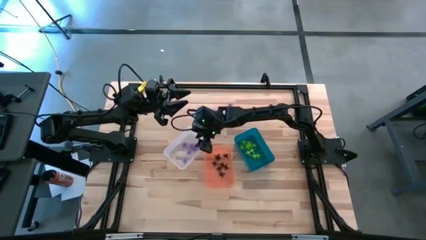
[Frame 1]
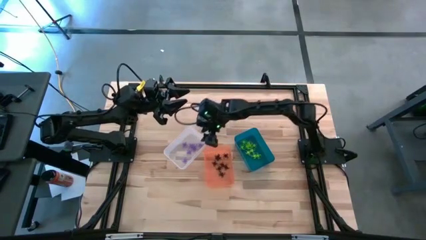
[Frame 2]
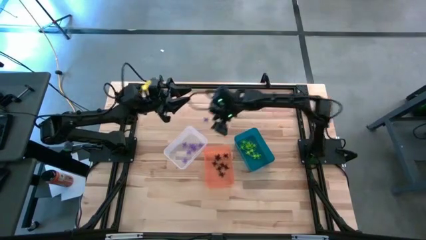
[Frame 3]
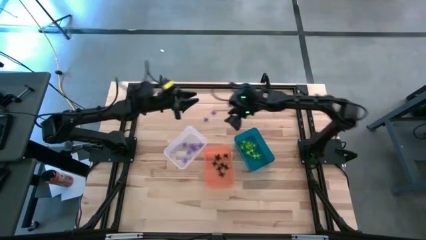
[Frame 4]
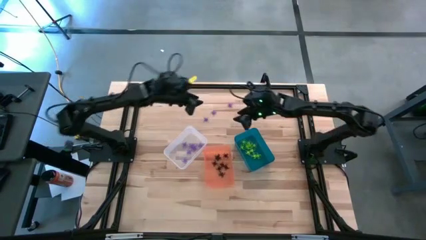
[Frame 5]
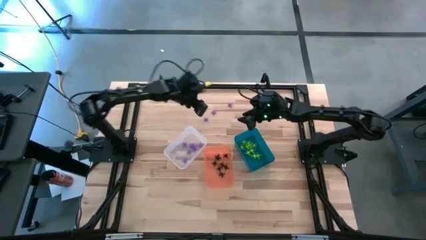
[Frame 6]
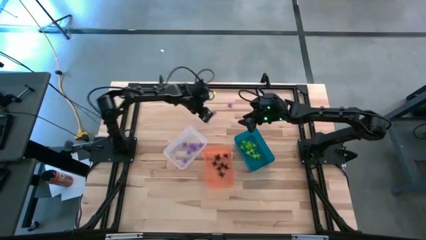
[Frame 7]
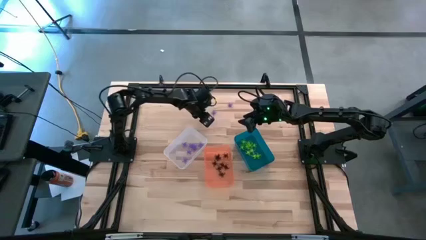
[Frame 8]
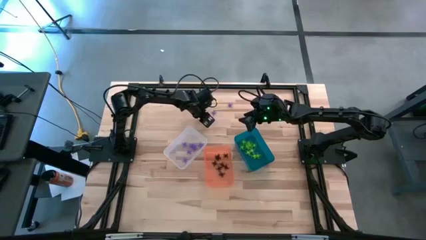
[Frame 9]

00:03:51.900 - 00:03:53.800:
Task: Sort Halloween decoration
Put the purple spider toy into the transparent bin

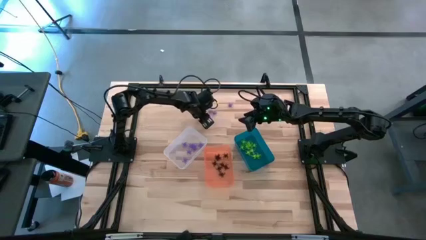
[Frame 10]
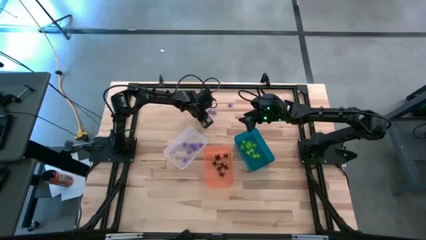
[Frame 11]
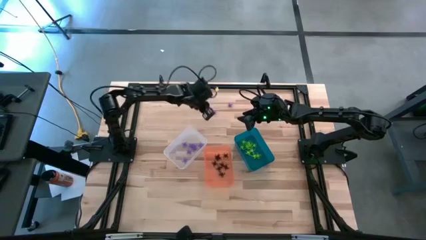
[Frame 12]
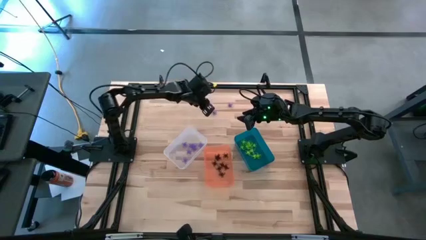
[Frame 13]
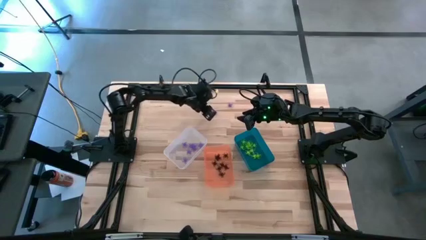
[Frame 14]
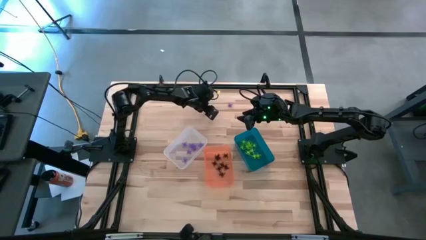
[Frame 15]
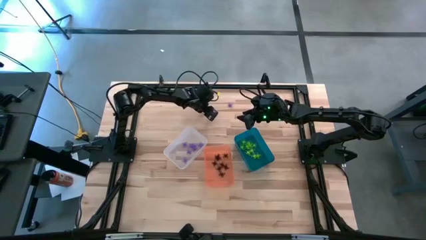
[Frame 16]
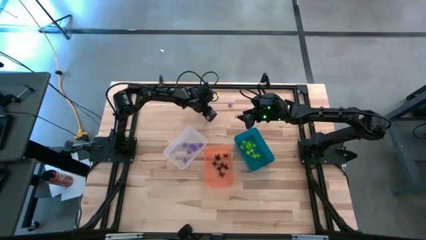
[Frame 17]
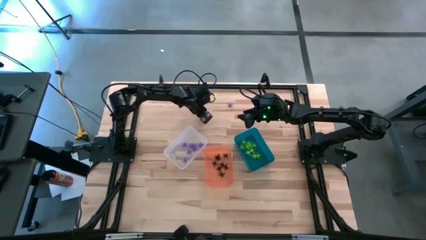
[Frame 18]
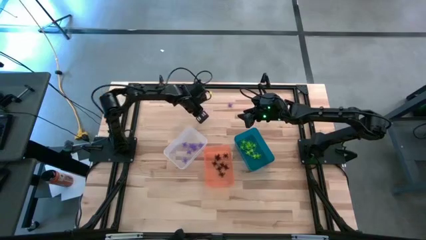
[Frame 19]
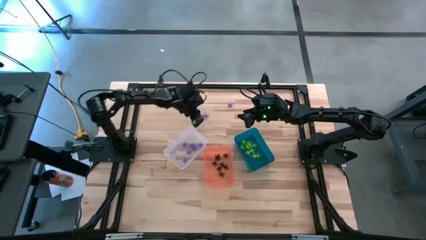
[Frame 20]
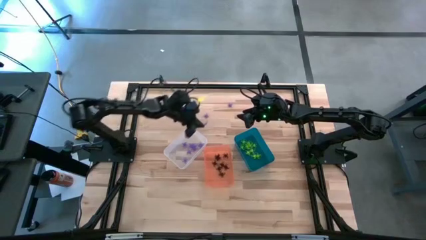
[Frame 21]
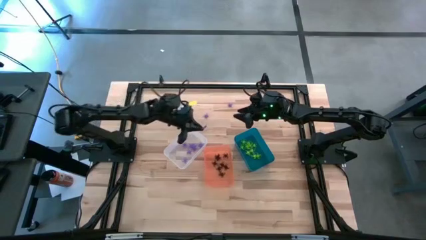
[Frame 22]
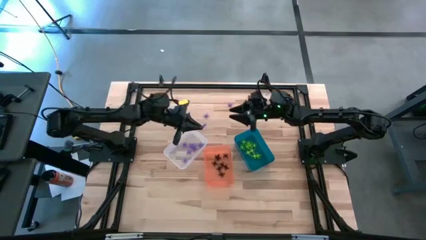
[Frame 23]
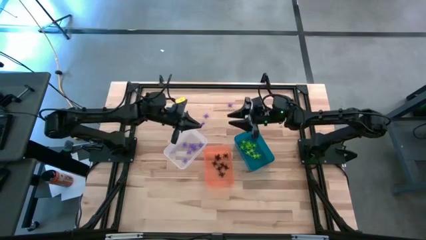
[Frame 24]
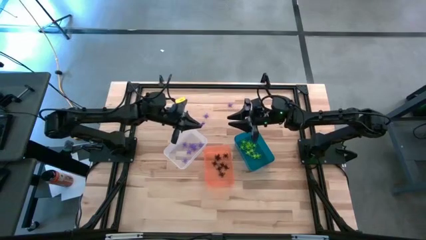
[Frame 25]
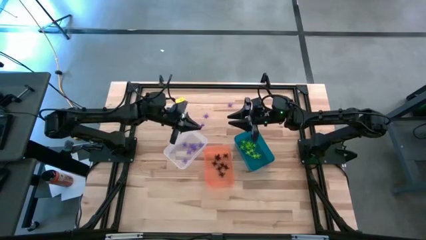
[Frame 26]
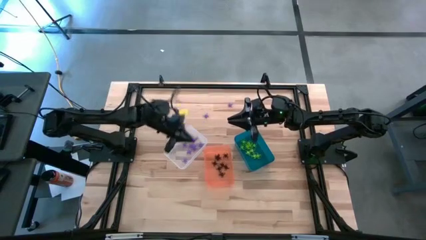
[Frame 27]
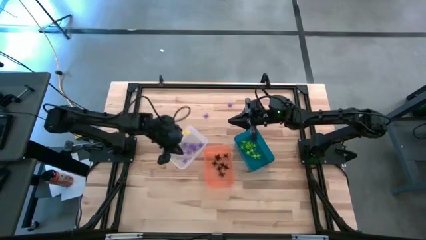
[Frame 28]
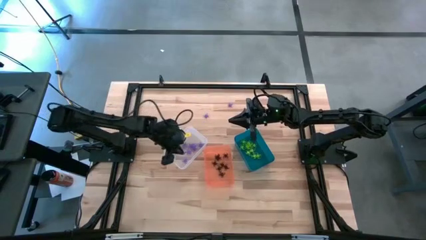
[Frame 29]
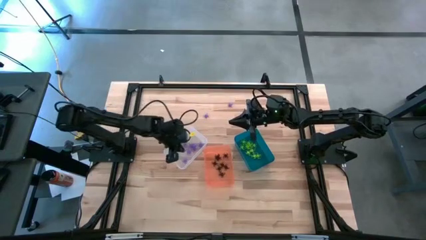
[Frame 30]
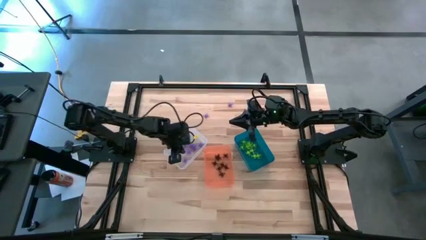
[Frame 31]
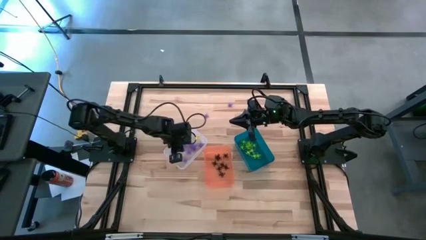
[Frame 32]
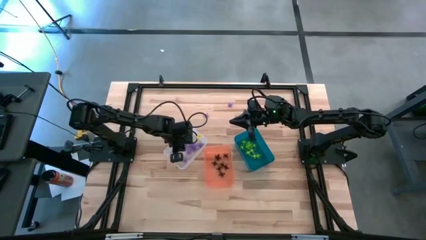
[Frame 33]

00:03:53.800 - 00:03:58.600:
Put the purple spider toy into the transparent bin

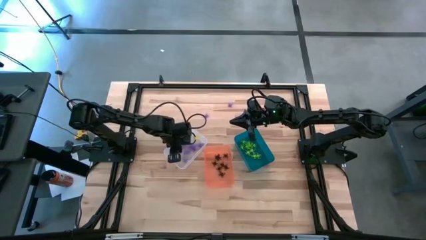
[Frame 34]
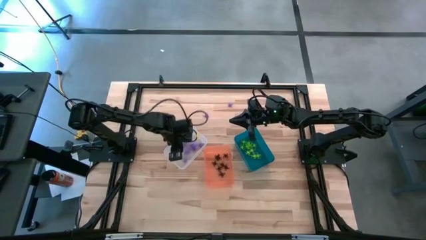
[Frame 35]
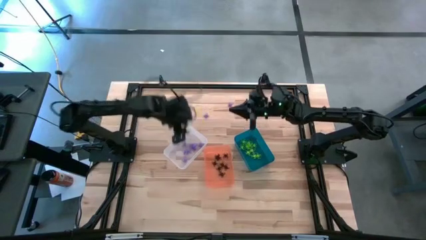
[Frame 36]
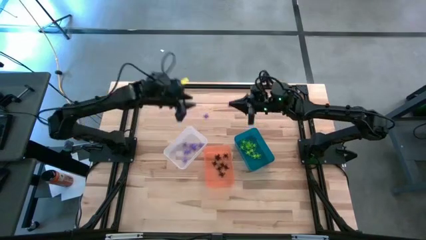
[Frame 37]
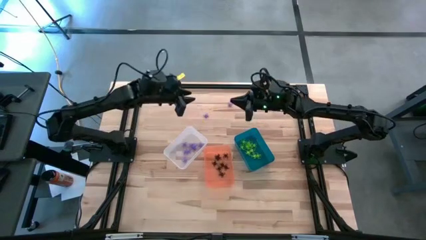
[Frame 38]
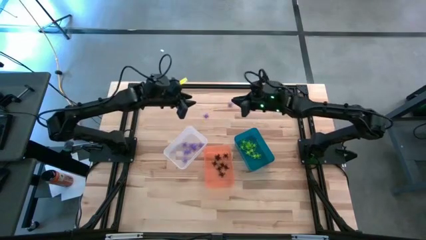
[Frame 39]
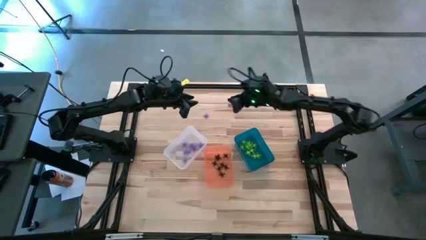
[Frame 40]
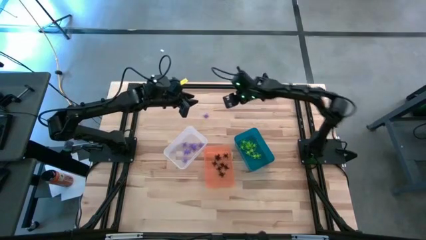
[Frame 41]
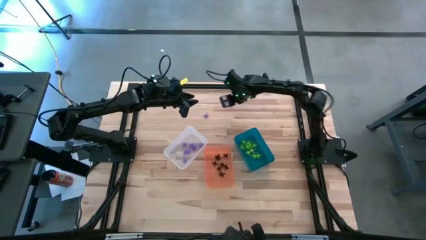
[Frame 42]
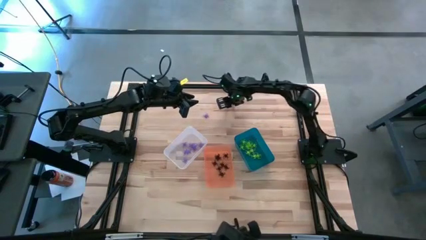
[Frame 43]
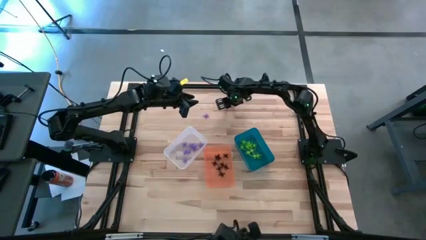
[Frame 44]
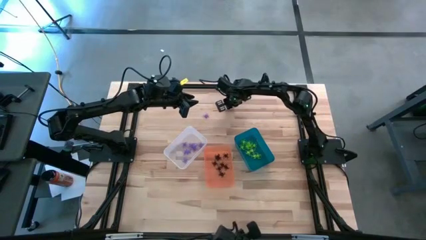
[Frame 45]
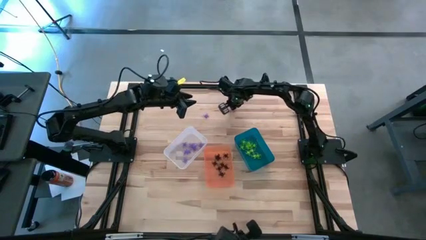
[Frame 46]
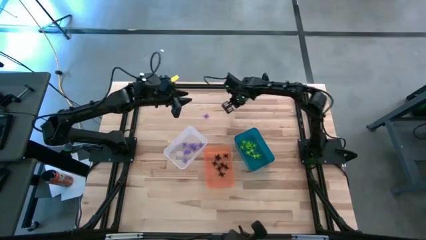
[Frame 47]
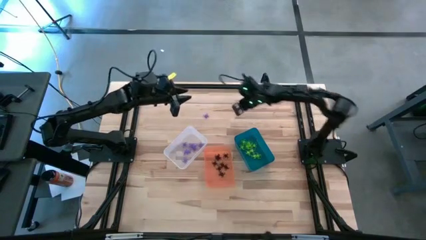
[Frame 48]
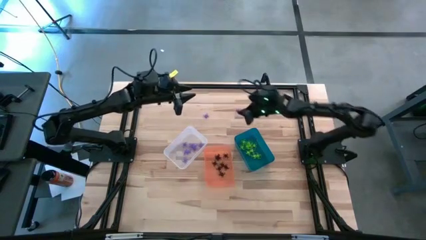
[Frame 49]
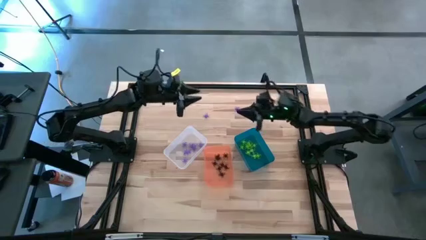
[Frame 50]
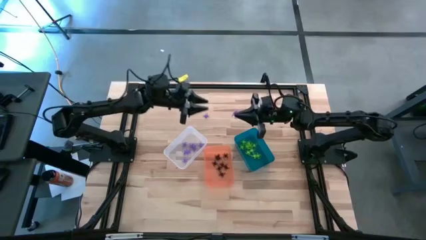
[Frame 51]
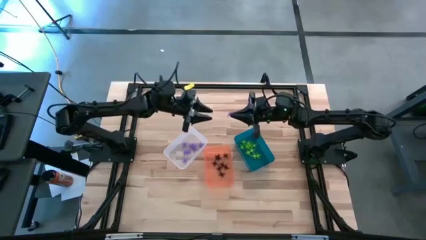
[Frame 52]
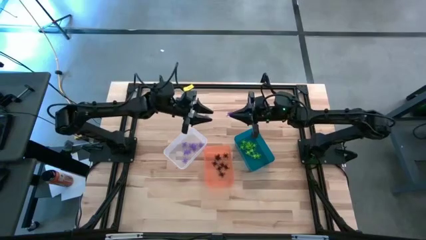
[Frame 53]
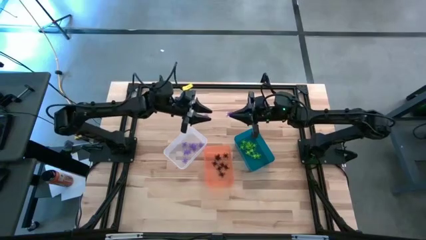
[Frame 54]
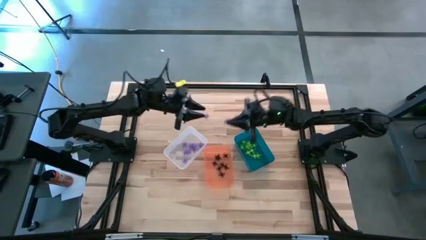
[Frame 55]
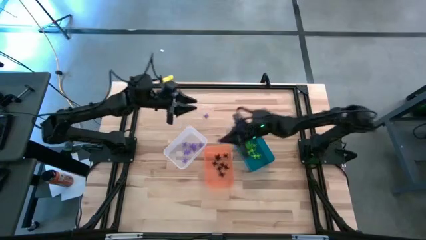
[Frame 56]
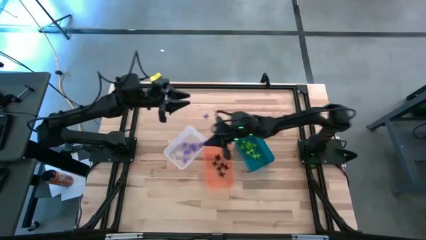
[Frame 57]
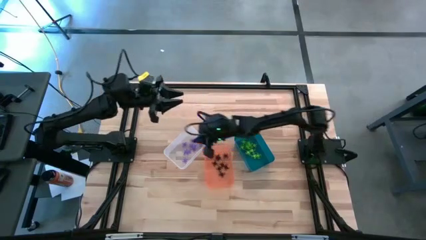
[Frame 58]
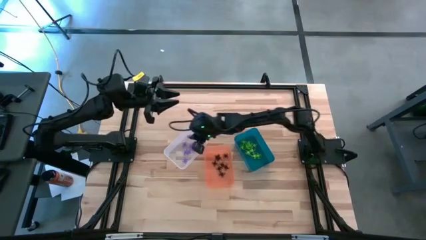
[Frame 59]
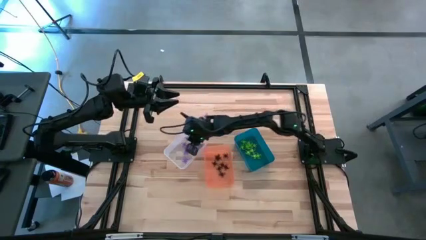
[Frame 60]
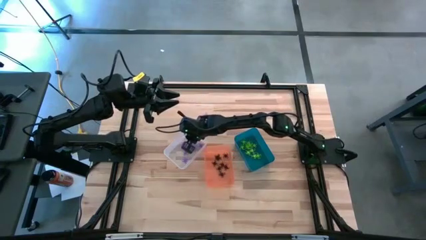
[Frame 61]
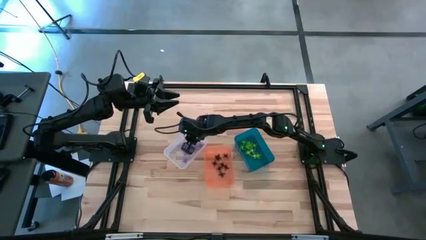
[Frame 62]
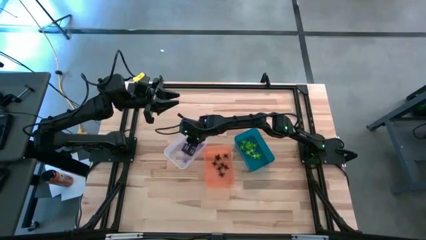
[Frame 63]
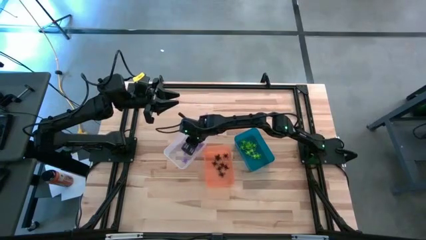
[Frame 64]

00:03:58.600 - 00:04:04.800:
Put the purple spider toy into the transparent bin

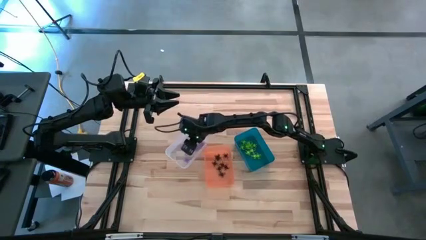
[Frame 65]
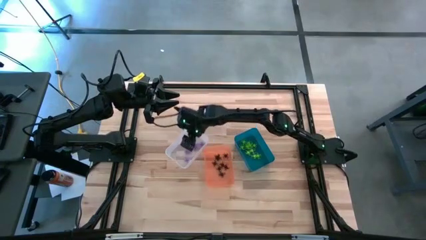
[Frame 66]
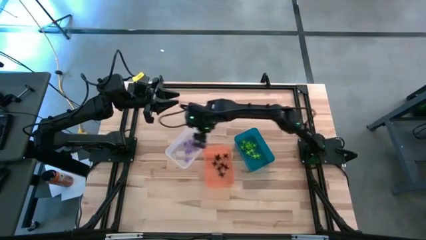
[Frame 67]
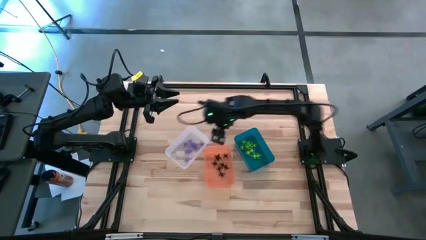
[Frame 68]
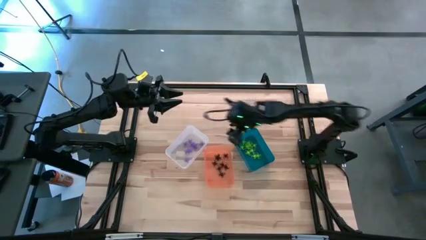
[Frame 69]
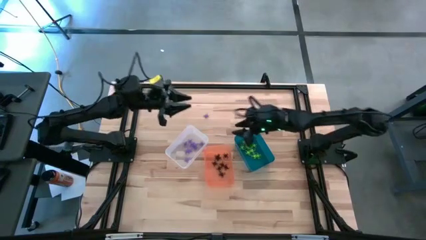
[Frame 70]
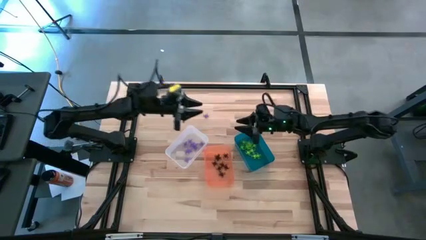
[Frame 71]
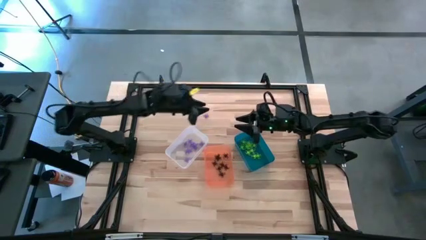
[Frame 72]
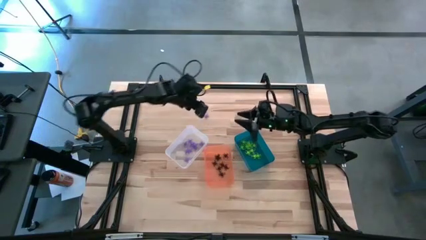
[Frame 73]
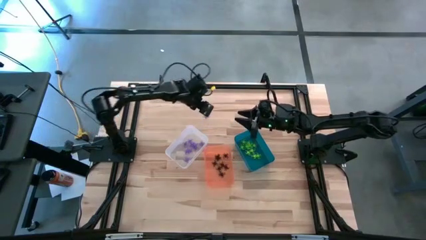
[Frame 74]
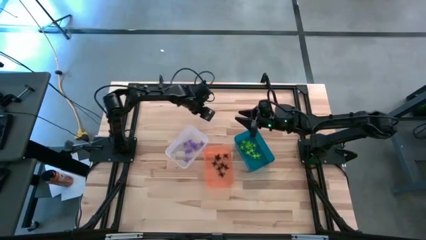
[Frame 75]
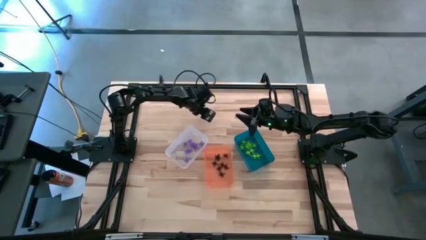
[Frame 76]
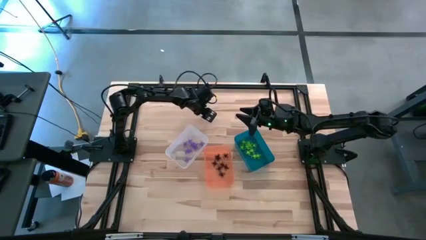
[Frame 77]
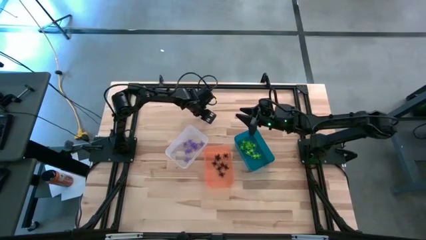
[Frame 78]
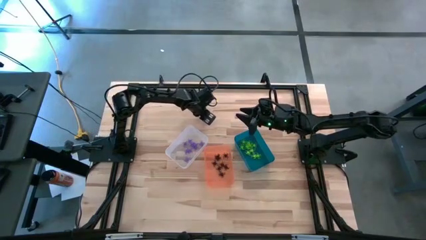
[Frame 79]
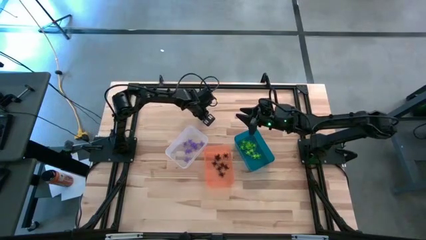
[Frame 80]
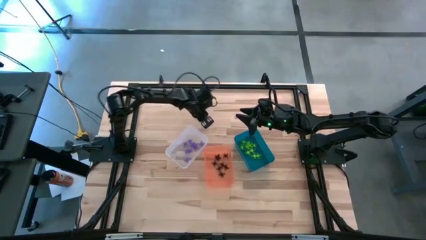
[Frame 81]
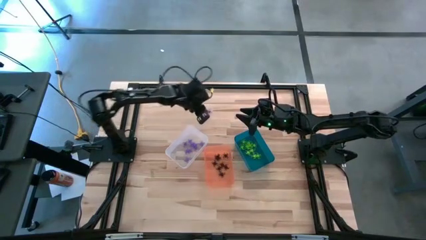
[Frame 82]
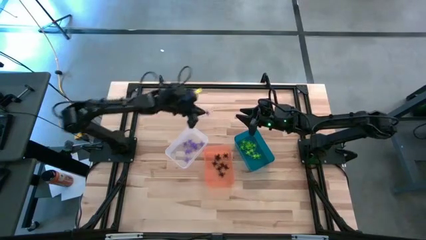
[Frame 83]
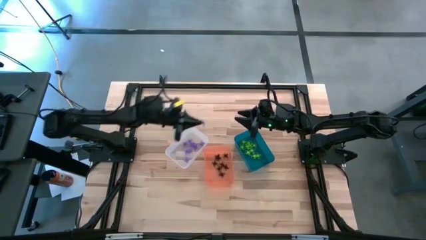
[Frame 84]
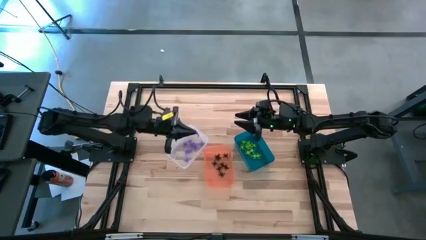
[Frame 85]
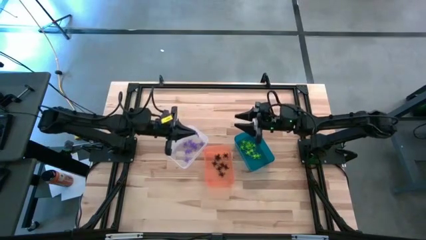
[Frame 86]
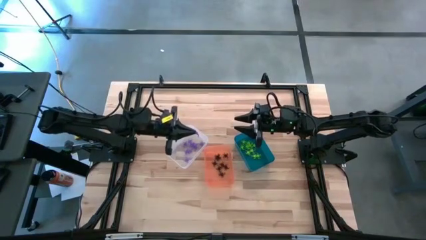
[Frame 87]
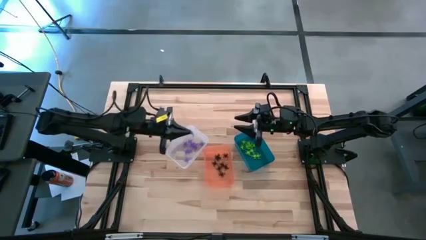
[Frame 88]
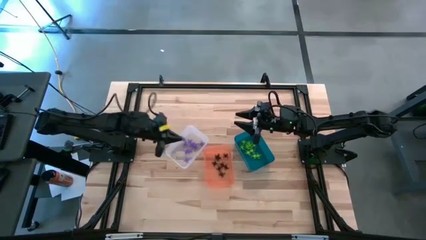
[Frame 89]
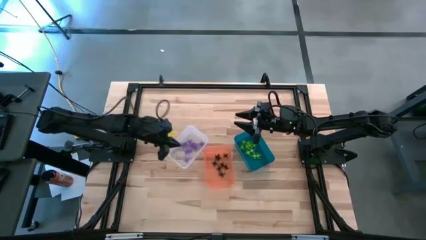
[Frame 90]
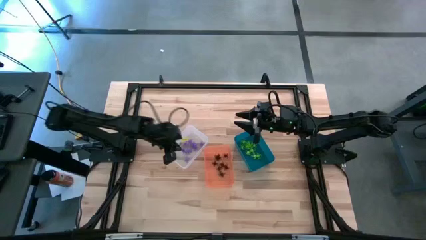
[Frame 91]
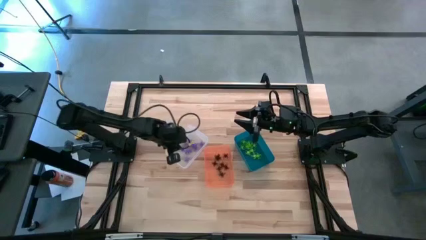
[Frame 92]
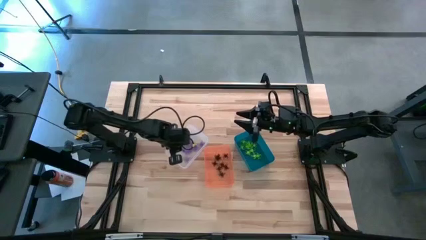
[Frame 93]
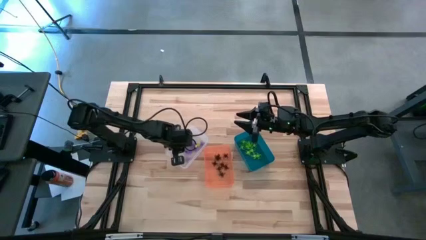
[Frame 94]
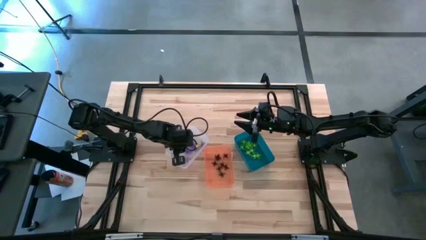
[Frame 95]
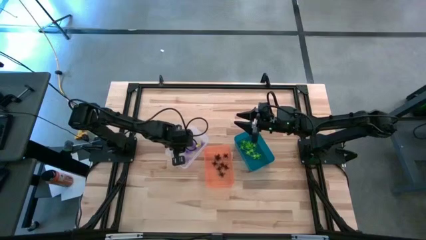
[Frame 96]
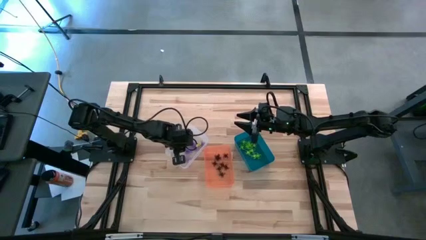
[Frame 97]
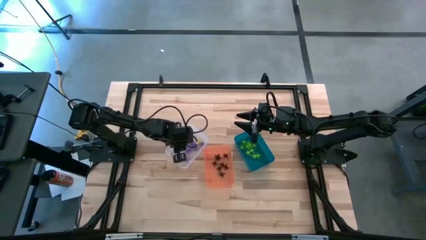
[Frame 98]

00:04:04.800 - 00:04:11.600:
Put the purple spider toy into the transparent bin
